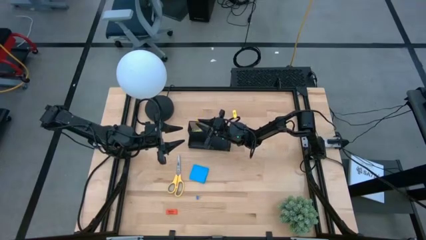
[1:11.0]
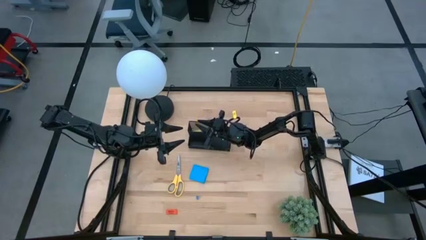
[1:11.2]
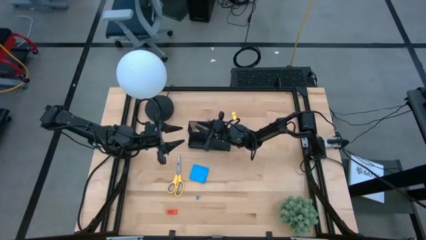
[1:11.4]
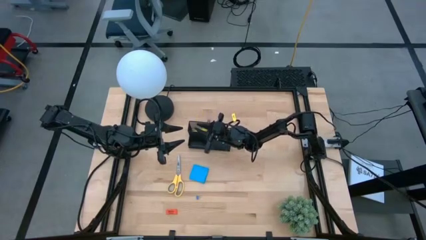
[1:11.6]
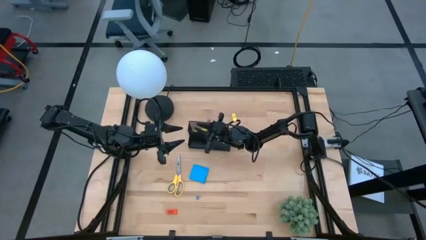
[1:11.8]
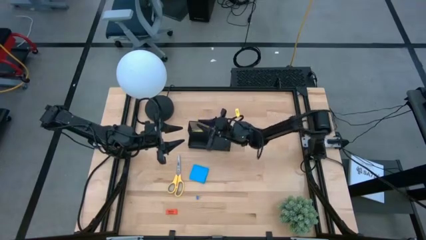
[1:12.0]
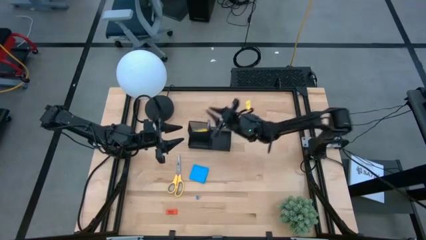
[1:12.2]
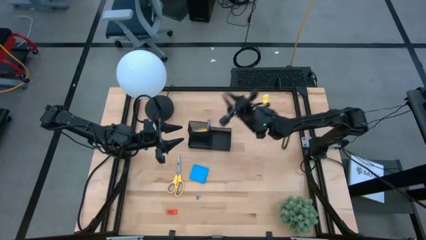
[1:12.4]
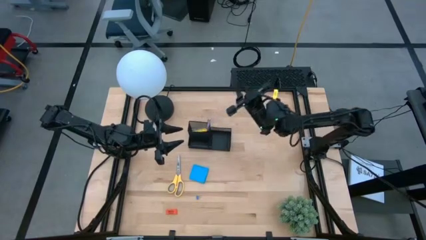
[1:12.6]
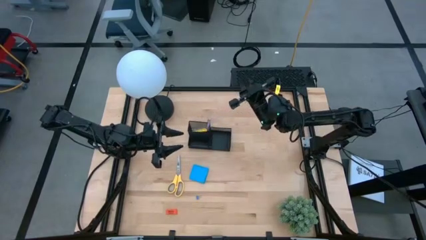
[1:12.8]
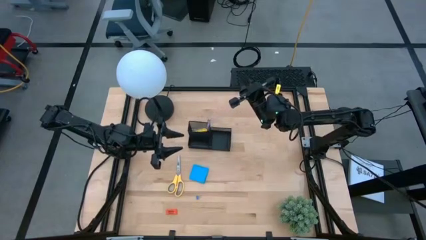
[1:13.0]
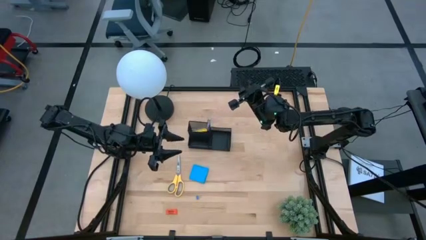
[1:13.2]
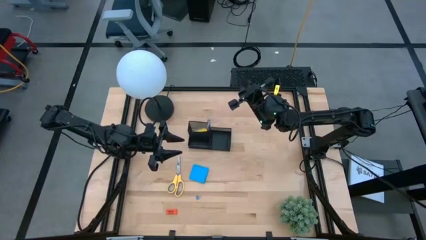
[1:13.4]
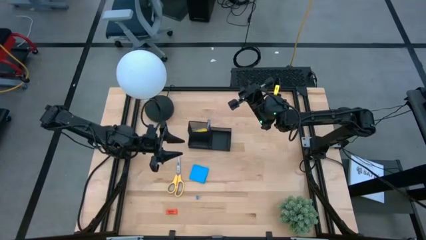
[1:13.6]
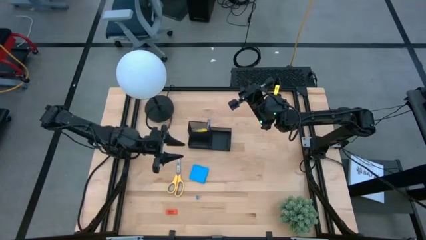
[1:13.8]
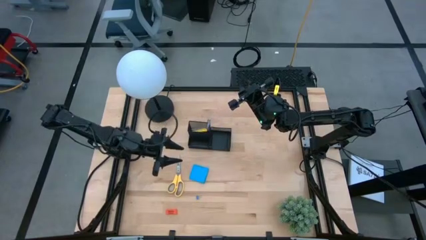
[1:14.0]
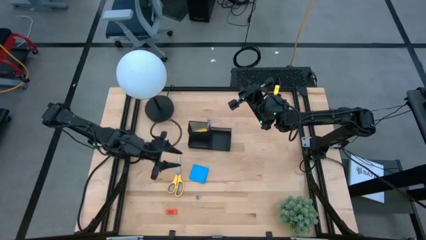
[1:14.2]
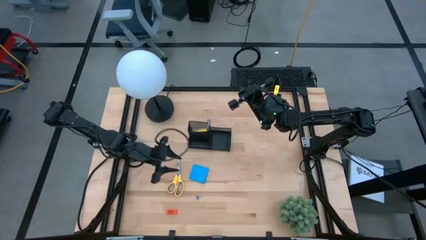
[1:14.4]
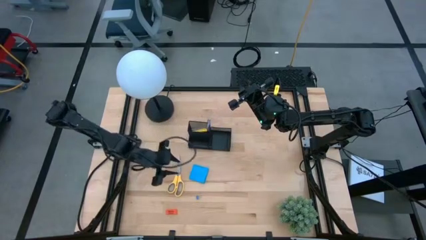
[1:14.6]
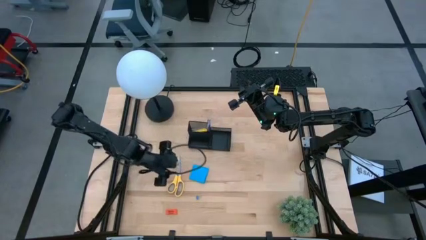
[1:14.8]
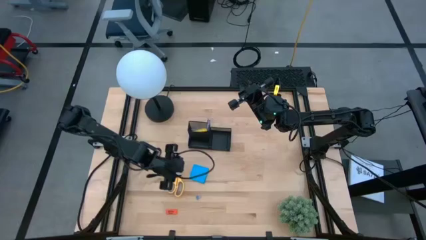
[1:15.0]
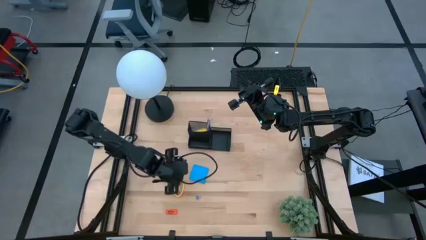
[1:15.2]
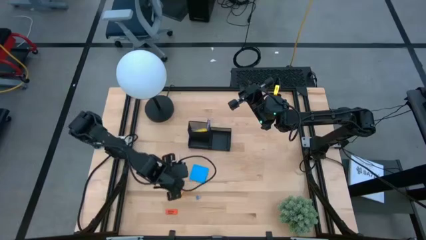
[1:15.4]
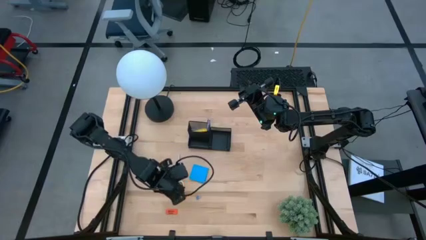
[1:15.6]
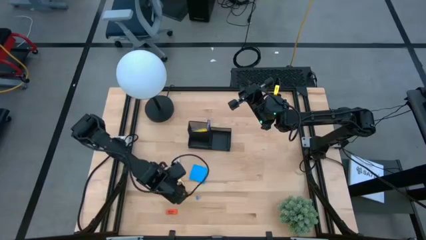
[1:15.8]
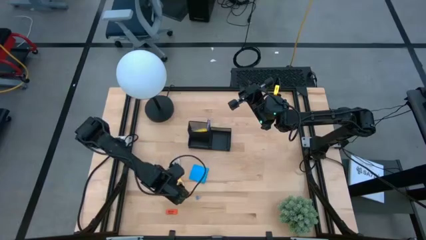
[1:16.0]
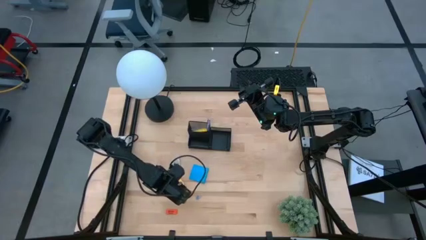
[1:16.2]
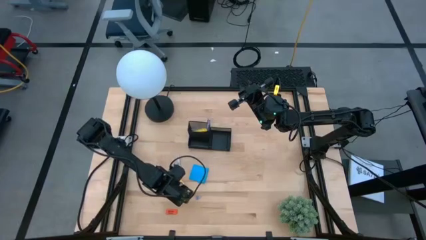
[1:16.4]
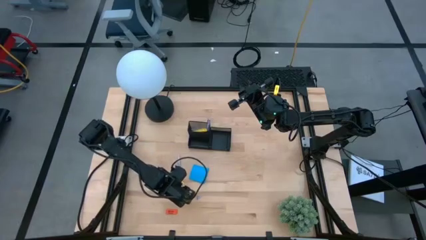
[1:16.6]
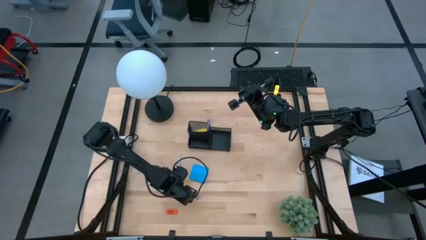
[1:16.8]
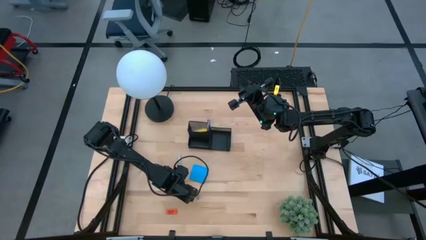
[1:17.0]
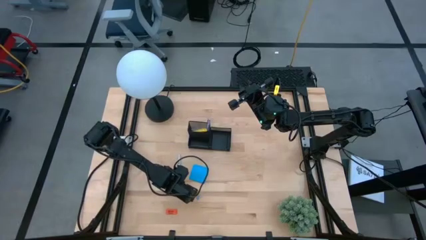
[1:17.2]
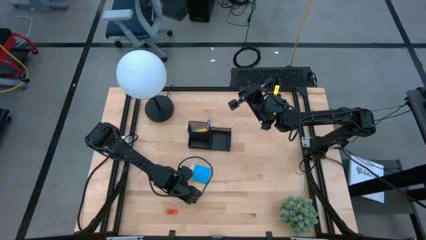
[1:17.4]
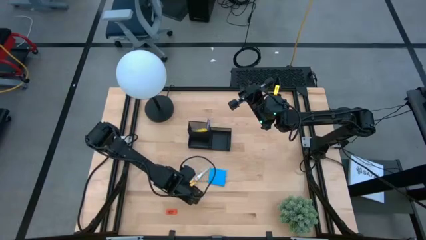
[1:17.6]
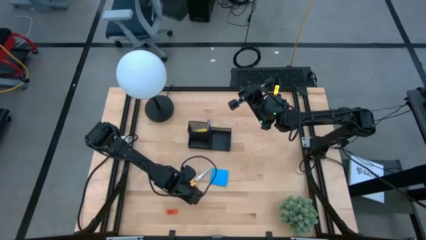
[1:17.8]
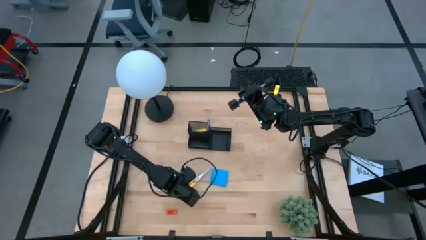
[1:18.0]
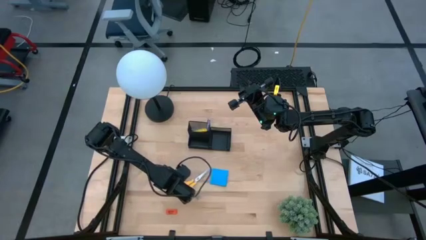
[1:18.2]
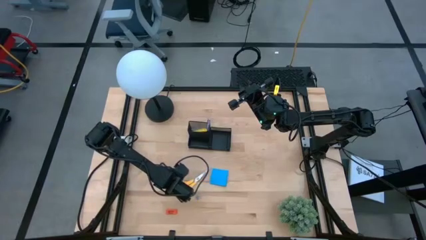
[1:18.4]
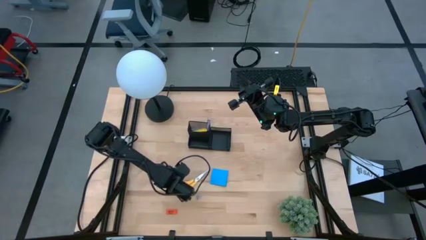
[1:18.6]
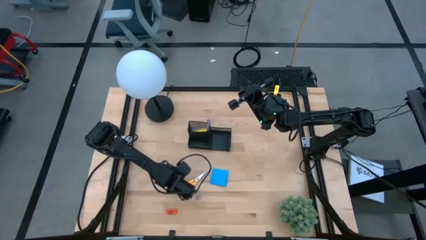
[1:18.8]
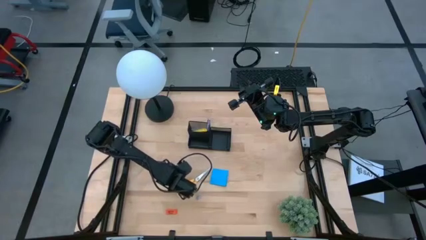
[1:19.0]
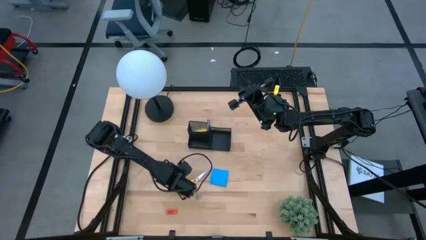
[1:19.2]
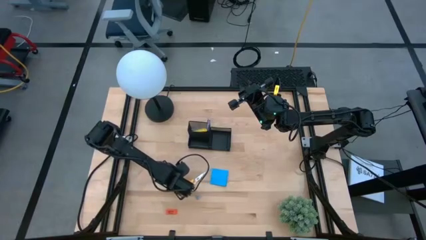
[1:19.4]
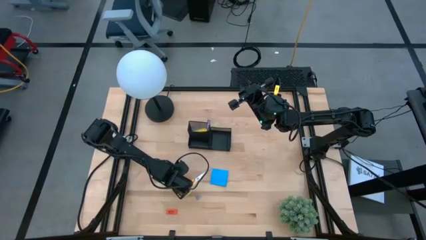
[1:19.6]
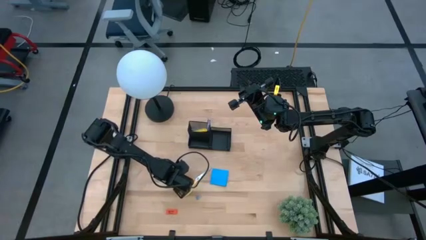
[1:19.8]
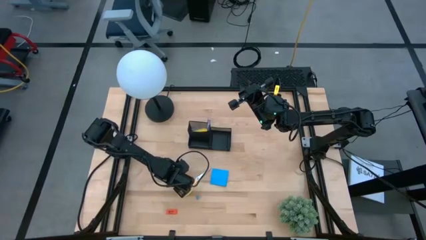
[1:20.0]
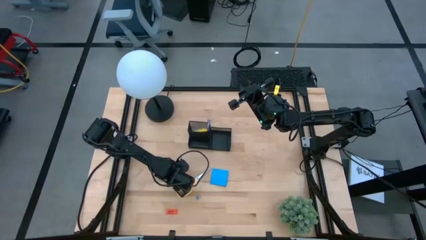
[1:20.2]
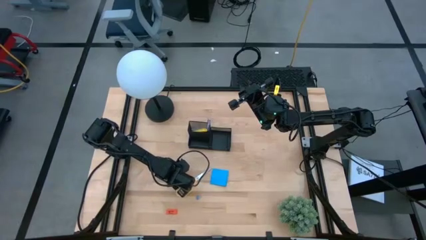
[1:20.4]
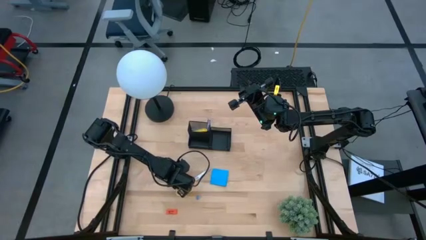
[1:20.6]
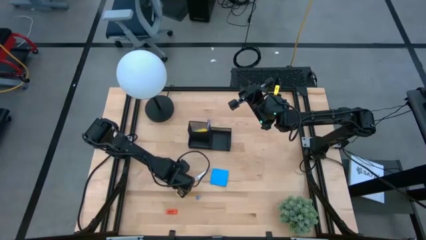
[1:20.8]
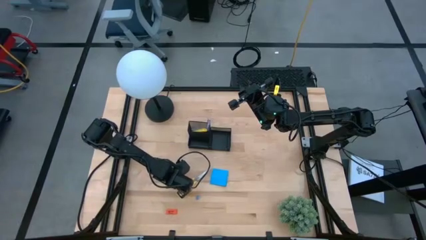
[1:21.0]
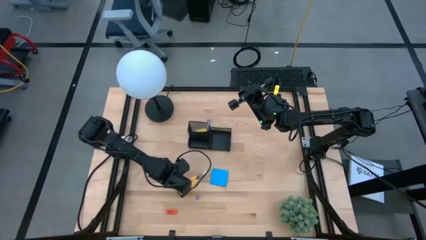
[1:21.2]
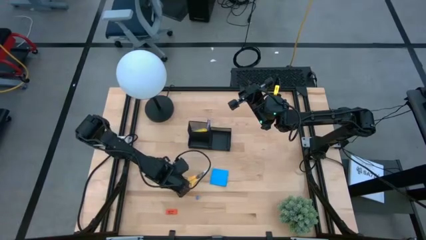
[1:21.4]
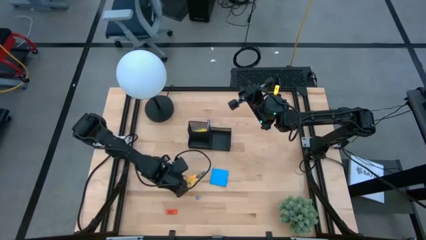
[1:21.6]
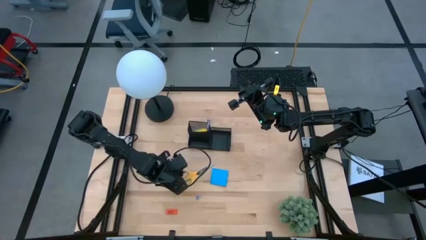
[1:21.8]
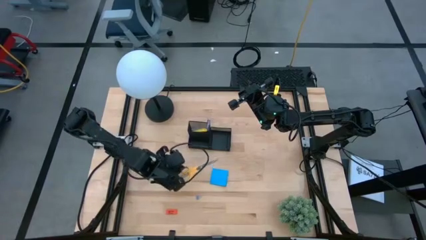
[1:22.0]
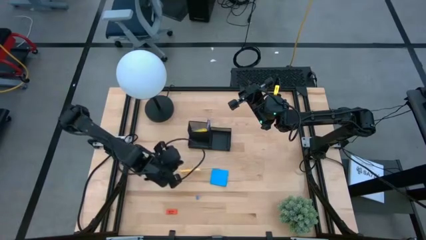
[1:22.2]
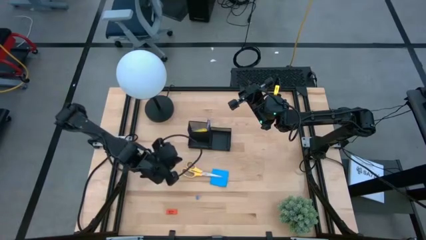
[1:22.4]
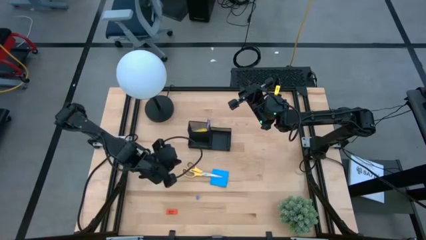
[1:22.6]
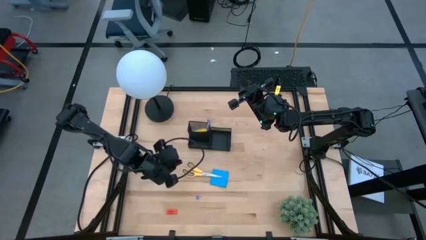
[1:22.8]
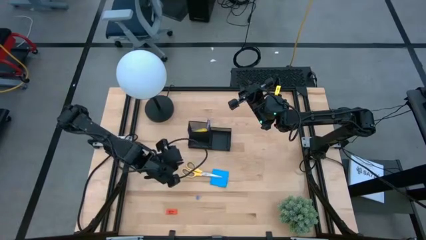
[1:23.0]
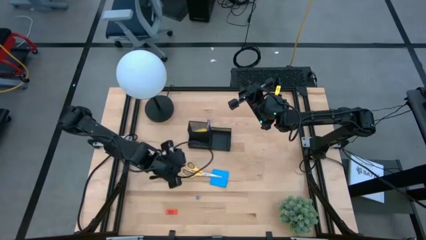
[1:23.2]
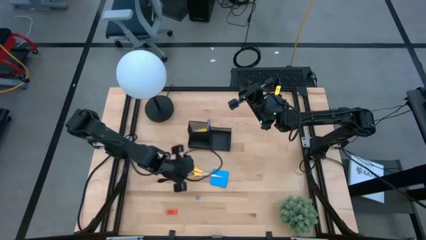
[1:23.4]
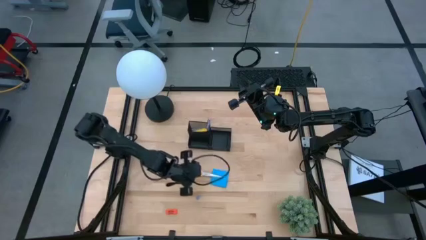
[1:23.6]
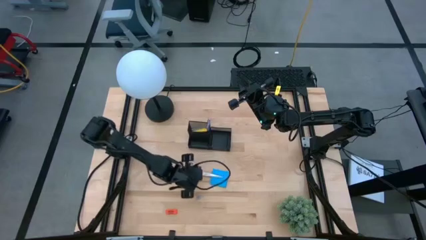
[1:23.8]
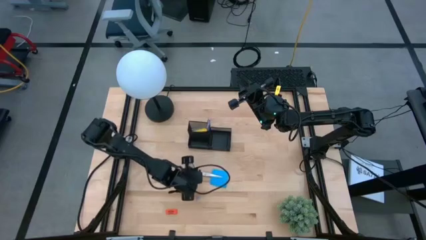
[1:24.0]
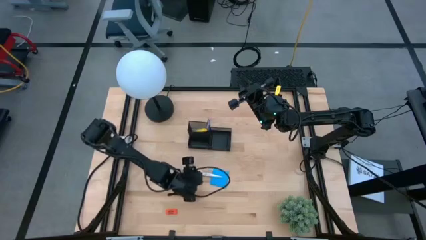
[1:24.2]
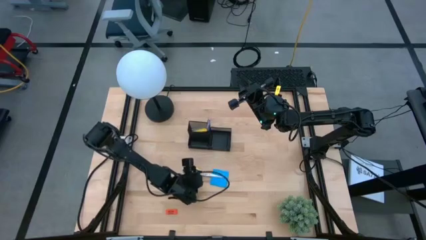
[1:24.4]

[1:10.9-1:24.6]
Task: Pick and place office supplies into organizer
Put the yellow scissors into the black mesh desk organizer
